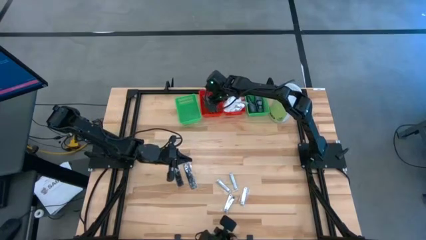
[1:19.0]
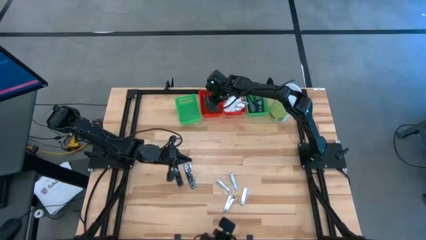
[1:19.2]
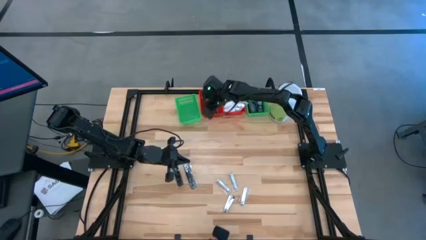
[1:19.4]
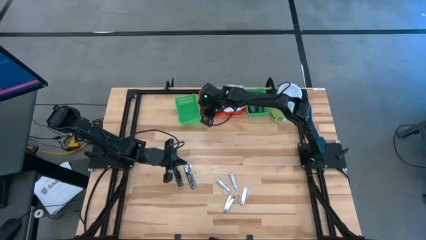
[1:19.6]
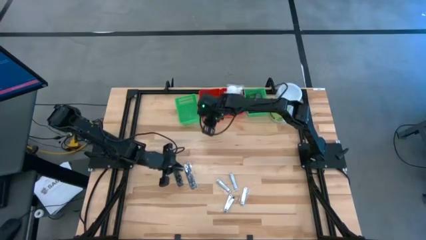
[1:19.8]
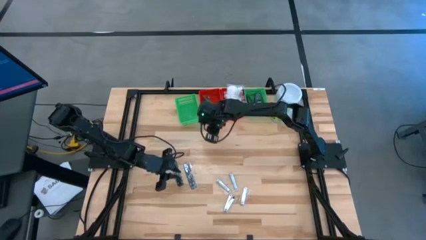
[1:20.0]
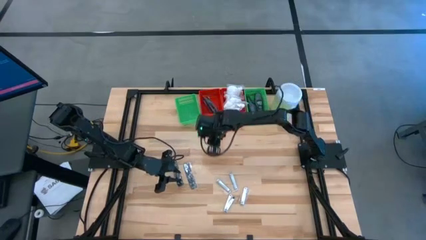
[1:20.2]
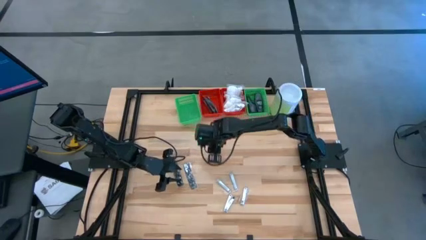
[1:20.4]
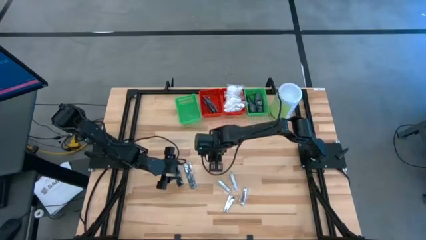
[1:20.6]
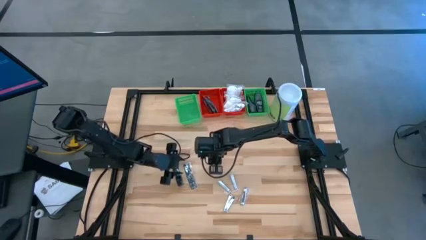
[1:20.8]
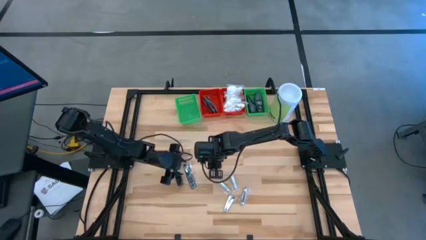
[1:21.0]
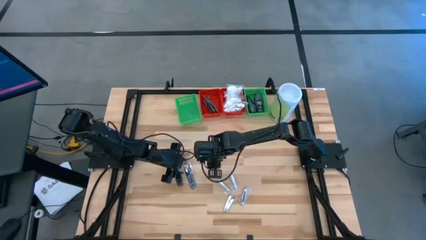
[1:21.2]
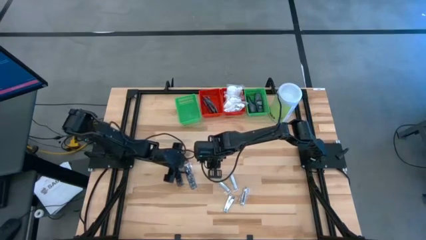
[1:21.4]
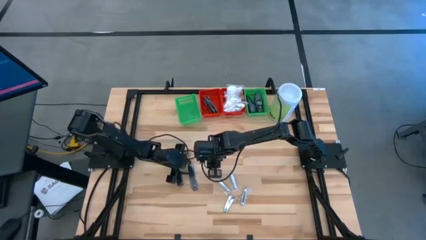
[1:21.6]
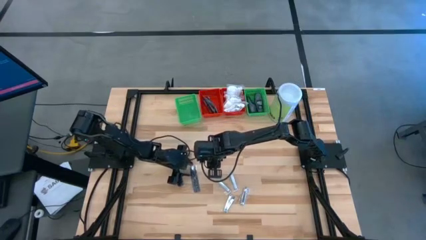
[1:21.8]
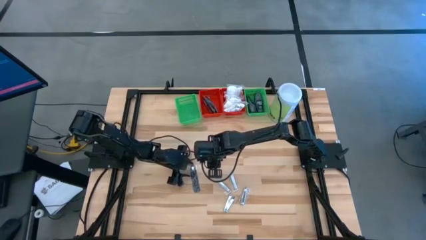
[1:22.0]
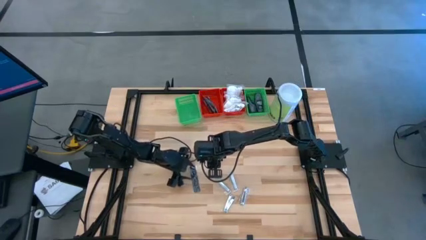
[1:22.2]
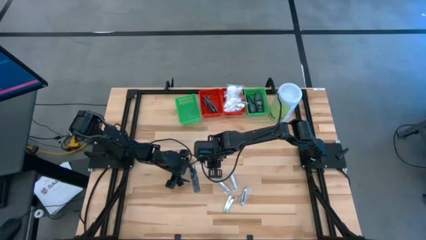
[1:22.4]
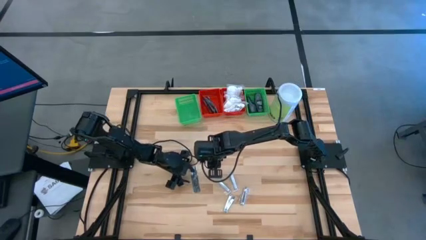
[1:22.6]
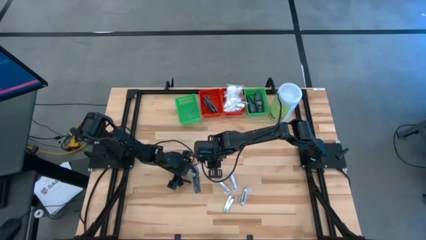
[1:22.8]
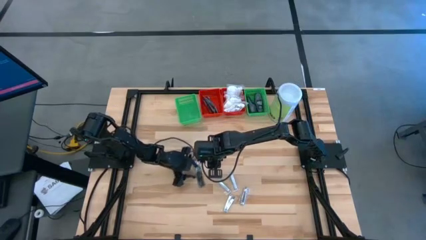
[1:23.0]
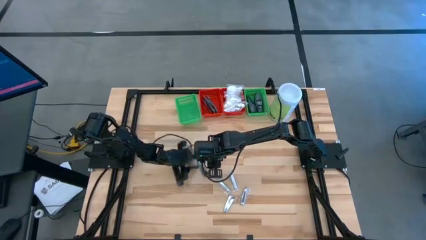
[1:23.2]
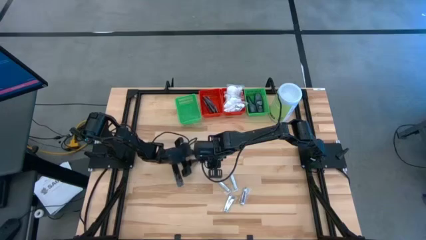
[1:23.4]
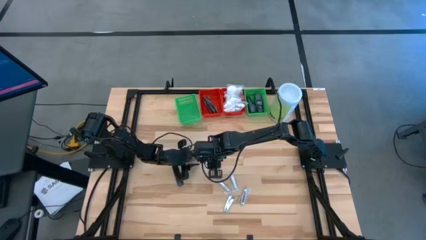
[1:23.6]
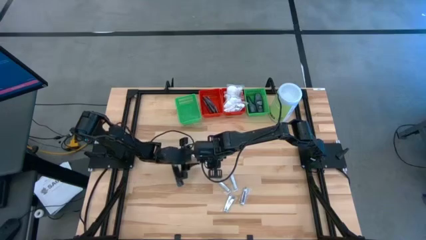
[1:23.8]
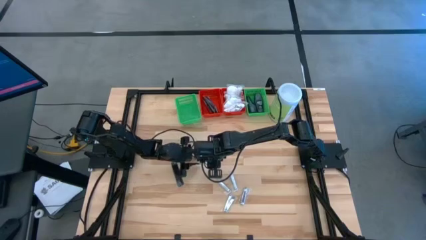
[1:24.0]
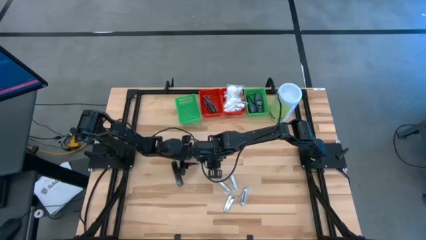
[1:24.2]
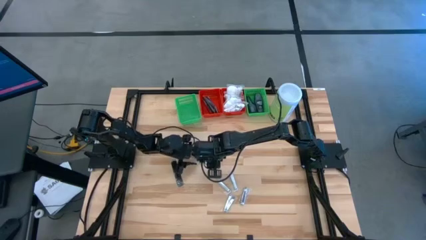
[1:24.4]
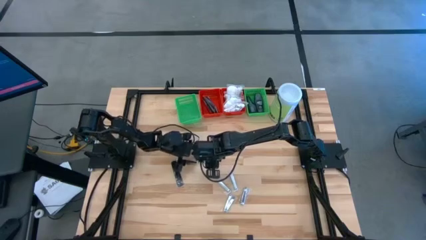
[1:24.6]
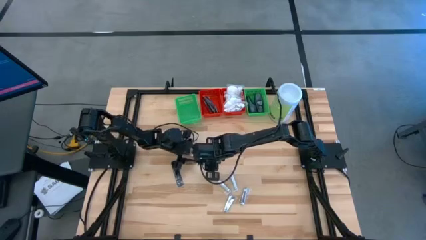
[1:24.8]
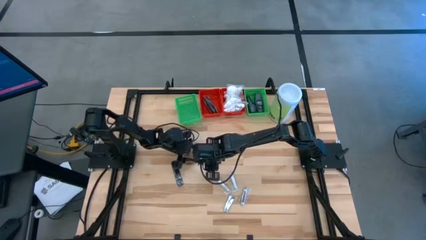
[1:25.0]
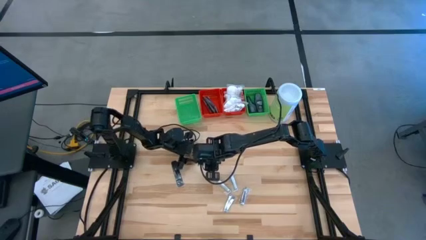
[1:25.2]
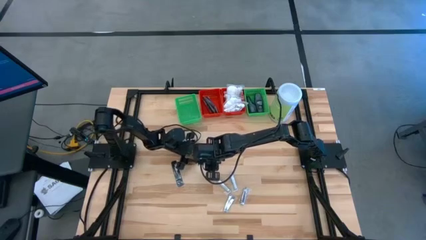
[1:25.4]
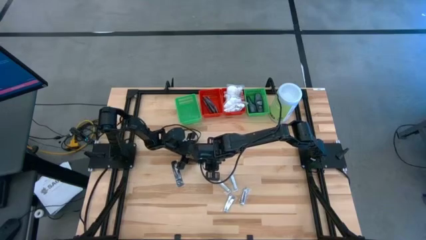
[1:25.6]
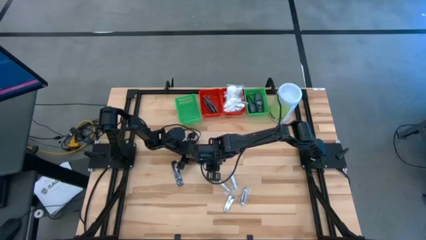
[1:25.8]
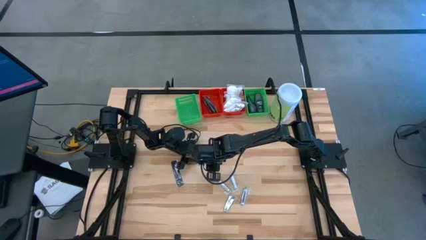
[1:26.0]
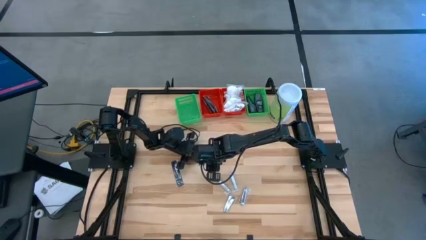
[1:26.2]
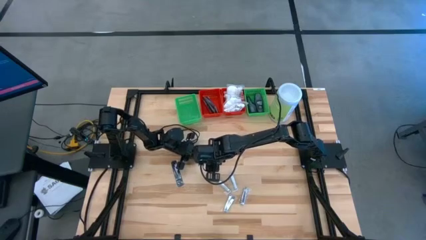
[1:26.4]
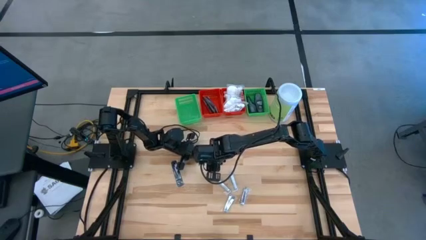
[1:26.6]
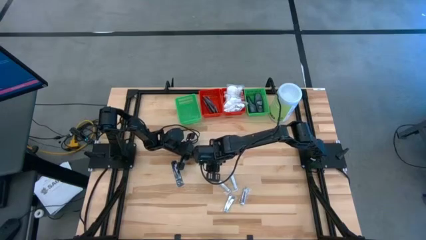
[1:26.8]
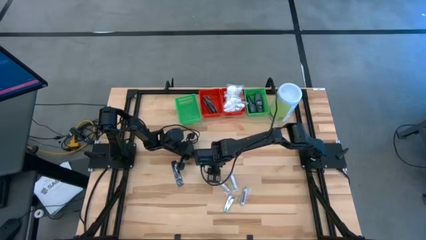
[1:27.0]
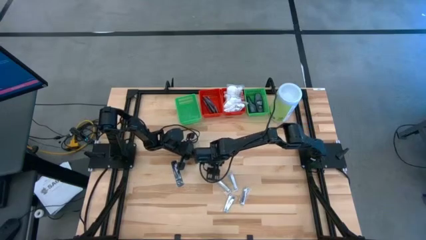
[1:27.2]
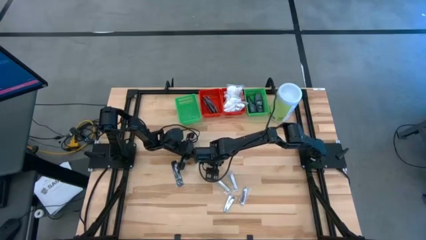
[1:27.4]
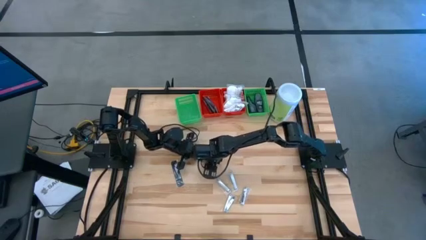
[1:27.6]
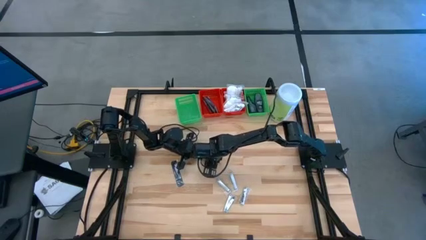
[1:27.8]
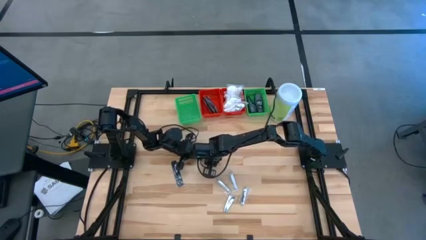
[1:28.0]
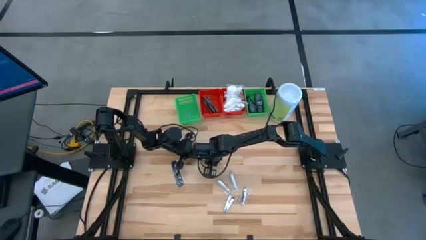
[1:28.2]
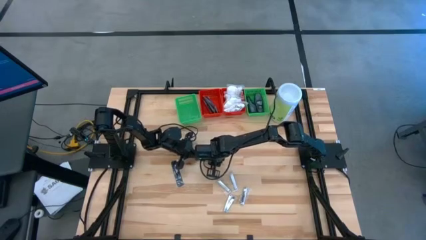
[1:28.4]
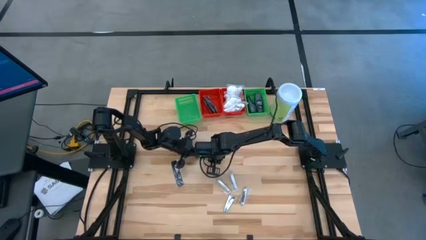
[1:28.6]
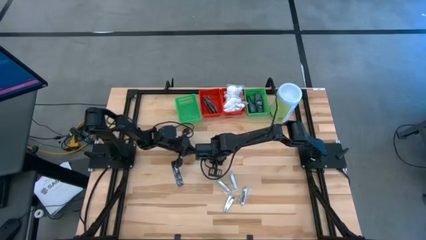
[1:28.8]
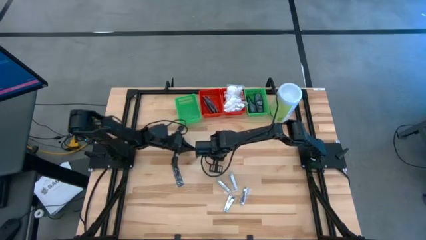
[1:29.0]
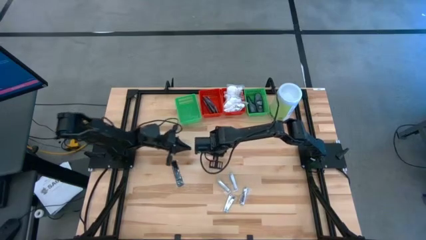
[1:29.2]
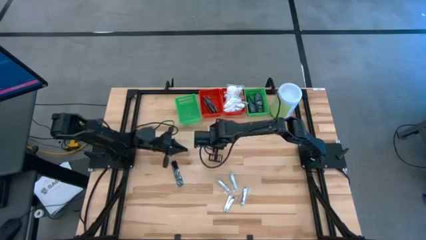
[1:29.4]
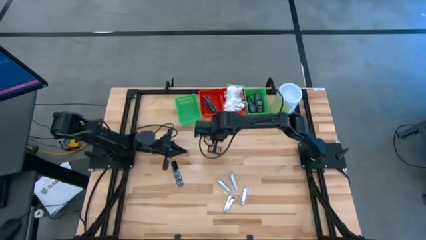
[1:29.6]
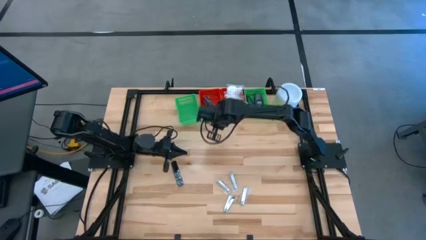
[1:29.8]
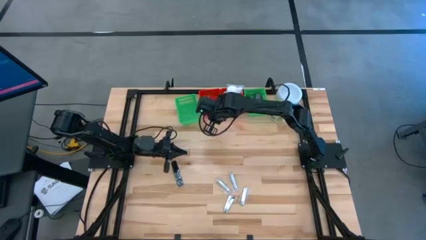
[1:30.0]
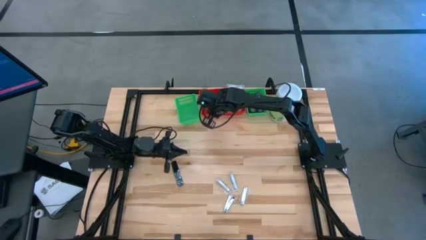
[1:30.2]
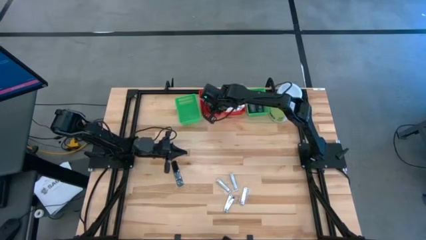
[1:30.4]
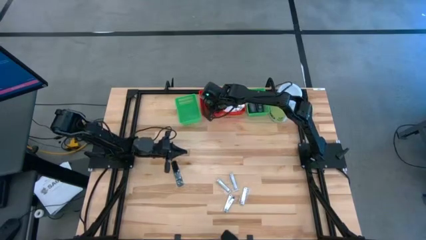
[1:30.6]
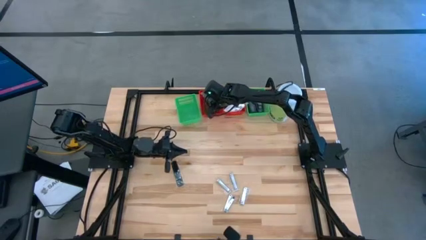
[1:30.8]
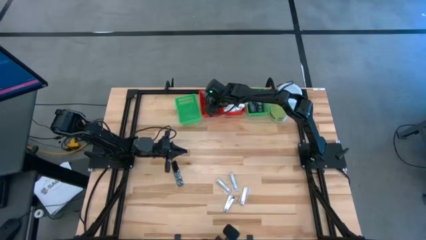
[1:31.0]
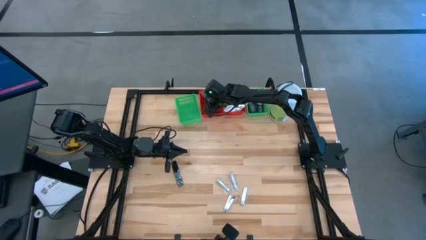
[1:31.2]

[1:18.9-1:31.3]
Task: Pick & Place Travel size toiletries
Put the black comb into the left red bin

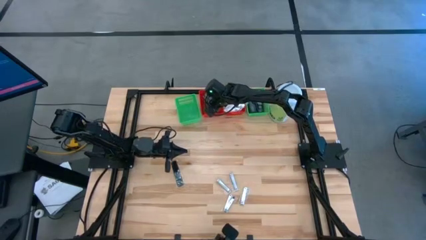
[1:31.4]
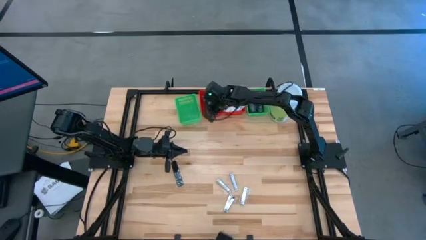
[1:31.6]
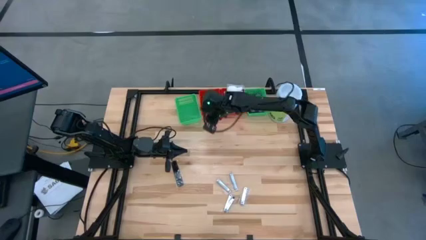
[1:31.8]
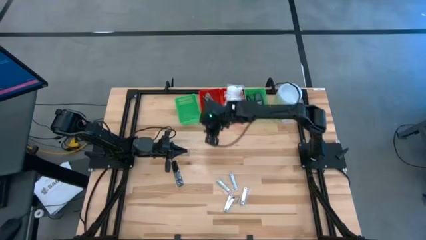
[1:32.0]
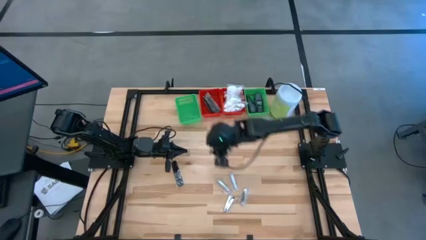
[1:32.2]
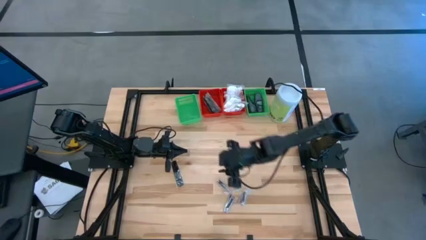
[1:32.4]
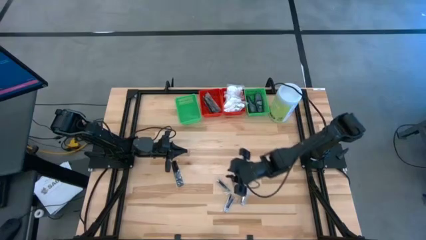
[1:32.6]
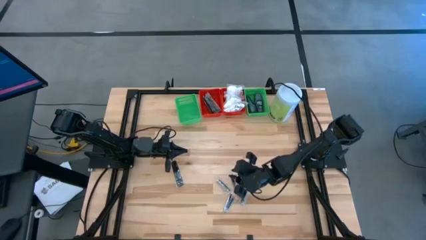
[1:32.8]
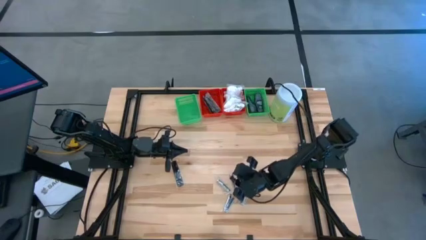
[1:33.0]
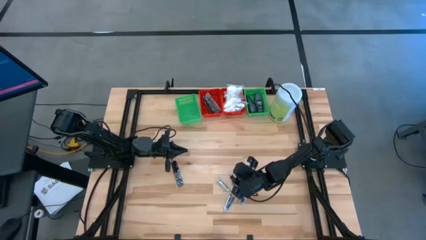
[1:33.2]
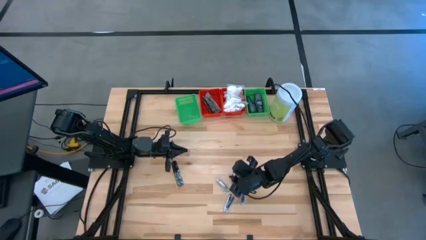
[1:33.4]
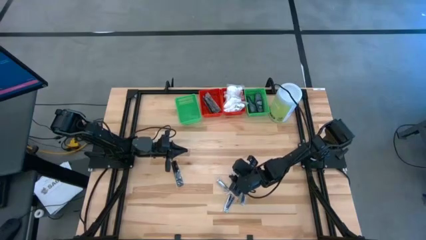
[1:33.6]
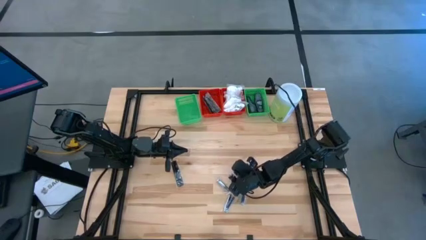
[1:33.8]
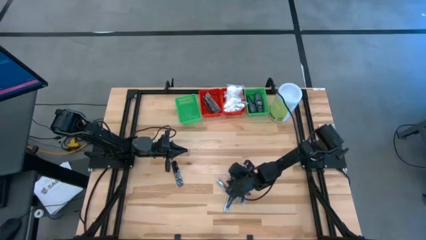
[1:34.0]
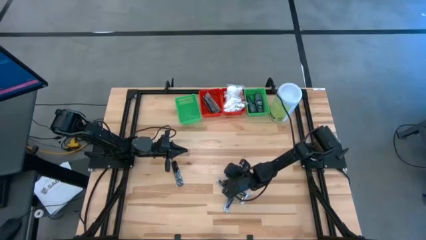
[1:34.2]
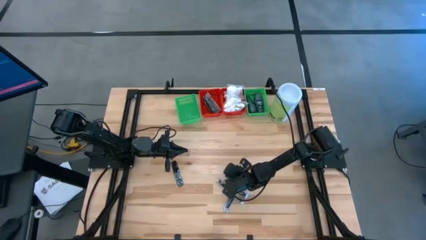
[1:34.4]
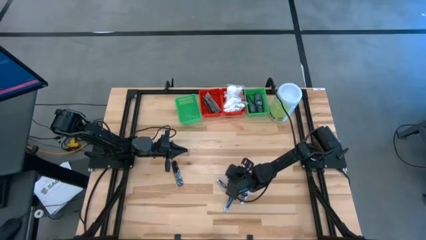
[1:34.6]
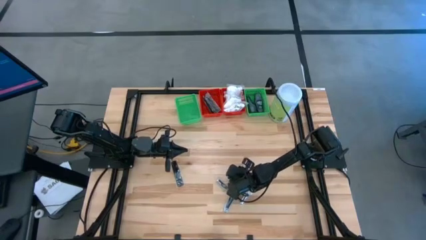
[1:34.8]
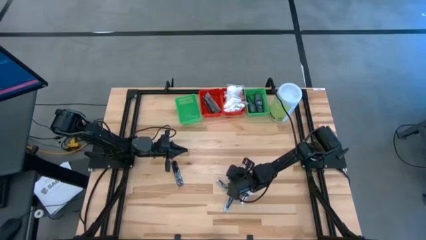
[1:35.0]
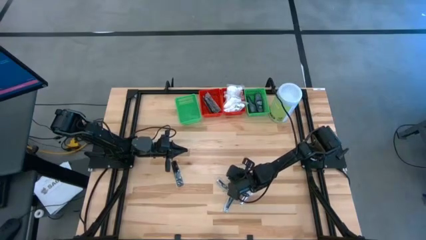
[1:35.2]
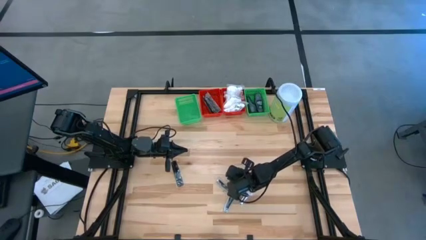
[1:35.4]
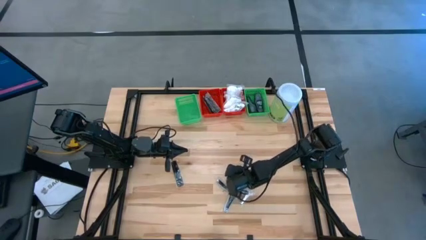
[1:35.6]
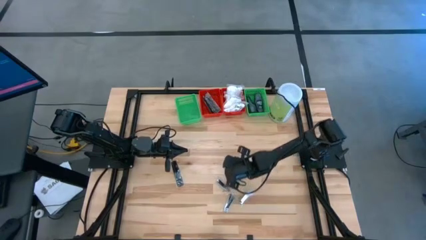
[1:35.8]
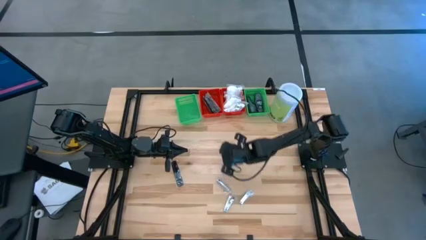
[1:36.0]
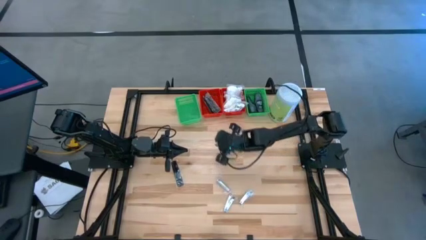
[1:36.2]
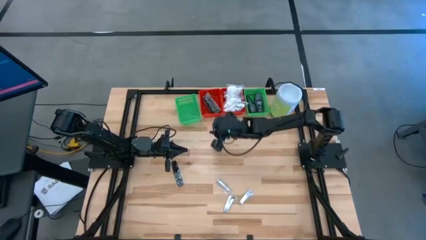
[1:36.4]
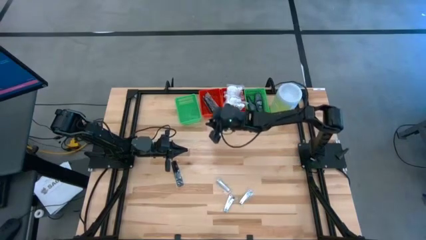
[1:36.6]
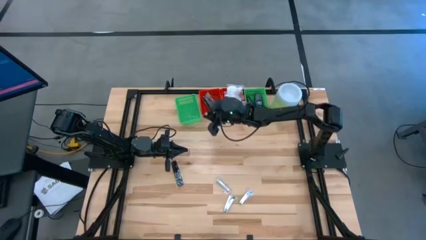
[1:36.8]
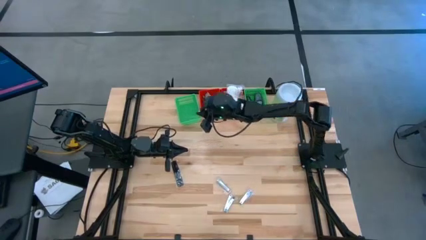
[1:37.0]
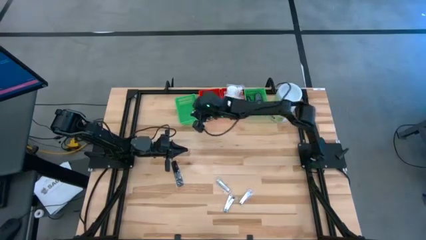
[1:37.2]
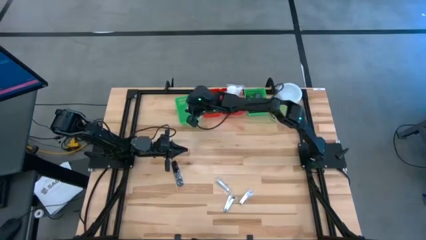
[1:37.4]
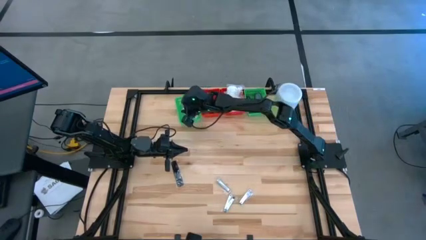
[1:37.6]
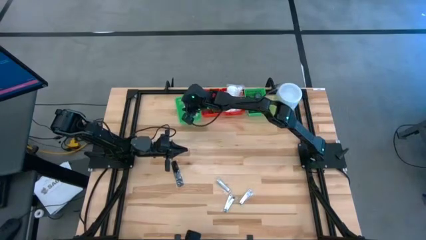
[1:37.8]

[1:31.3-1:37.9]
Put the silver nail cutter into the left green bin
